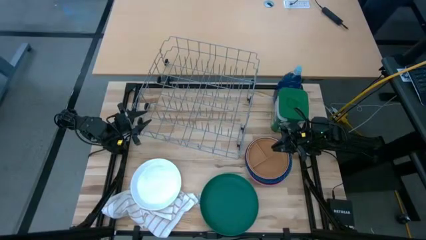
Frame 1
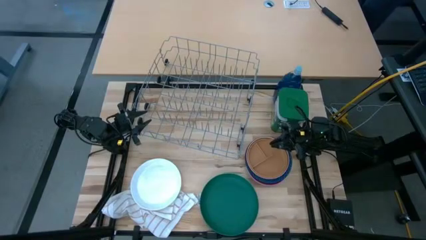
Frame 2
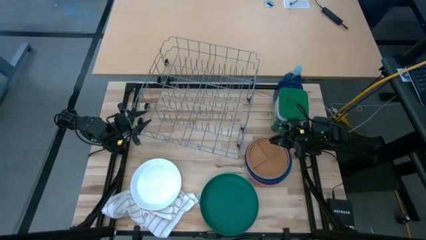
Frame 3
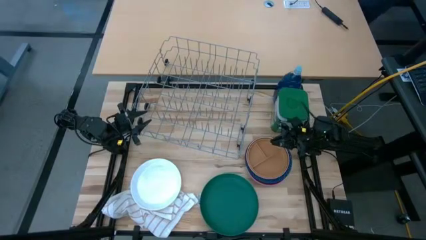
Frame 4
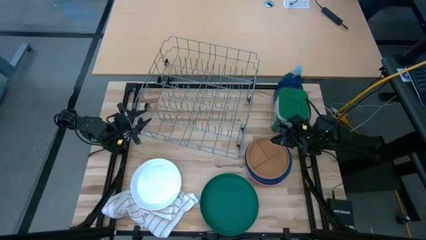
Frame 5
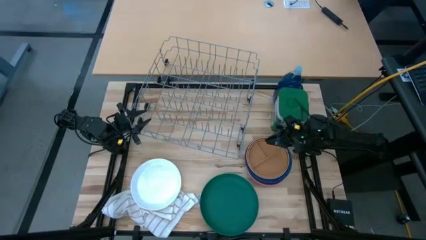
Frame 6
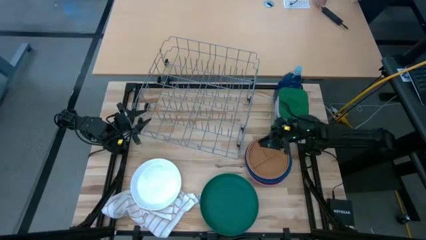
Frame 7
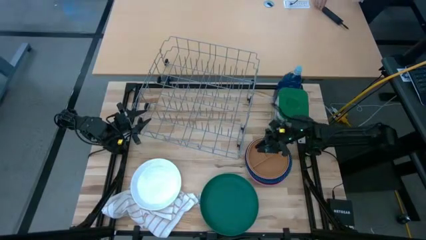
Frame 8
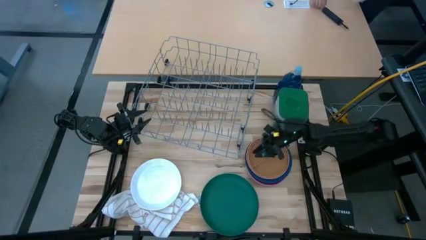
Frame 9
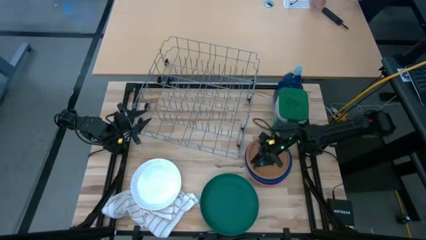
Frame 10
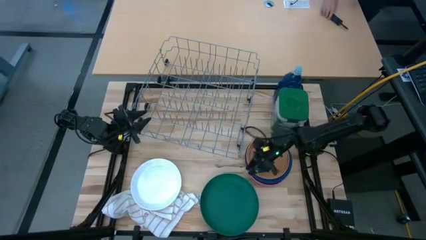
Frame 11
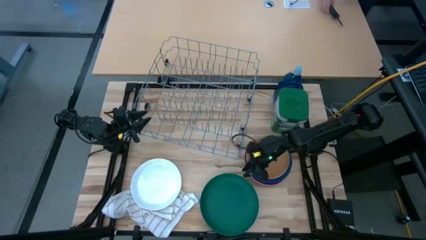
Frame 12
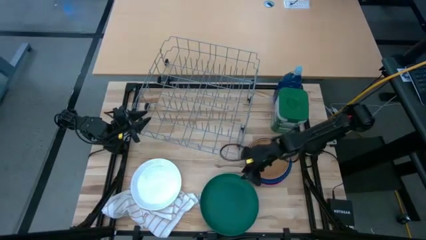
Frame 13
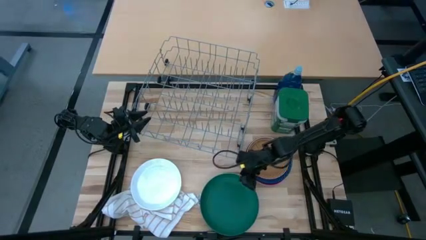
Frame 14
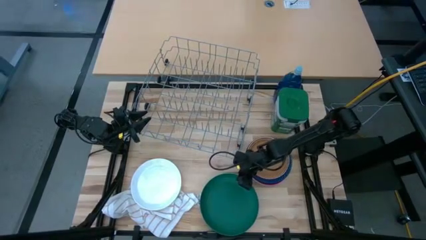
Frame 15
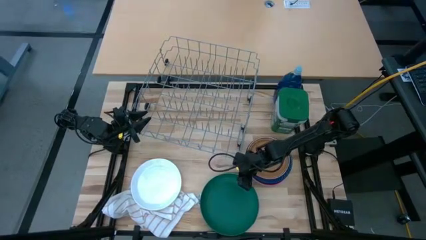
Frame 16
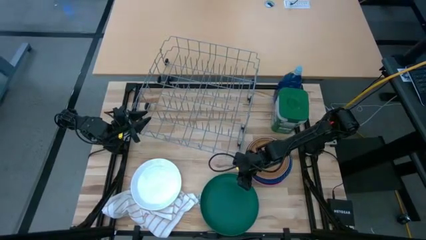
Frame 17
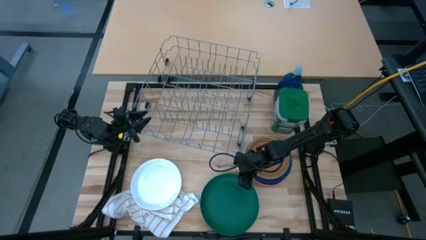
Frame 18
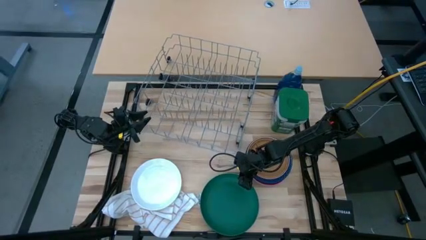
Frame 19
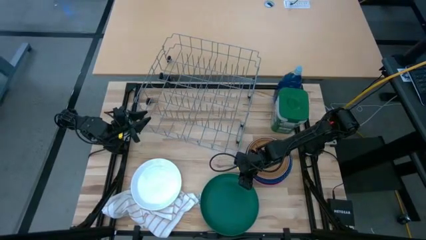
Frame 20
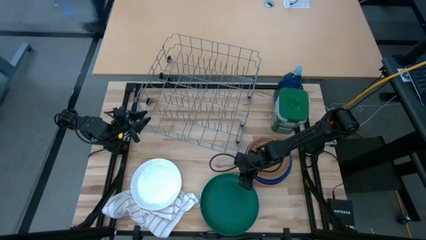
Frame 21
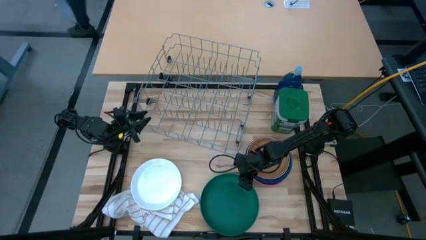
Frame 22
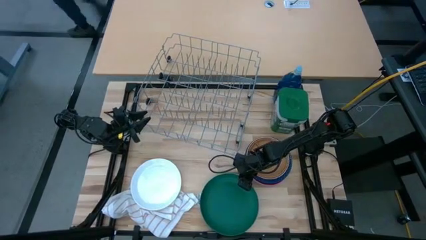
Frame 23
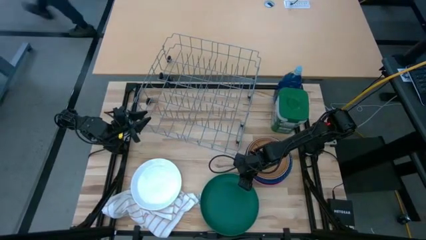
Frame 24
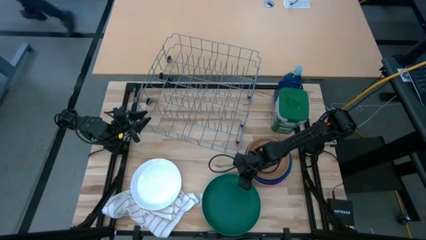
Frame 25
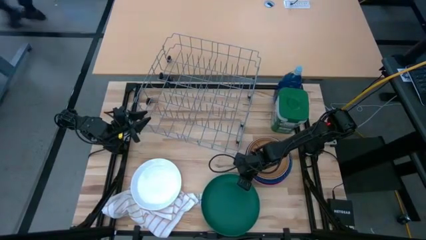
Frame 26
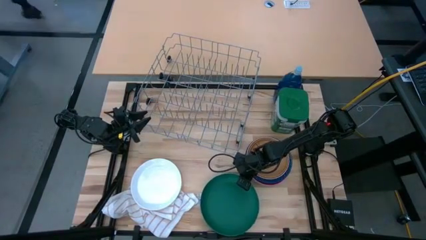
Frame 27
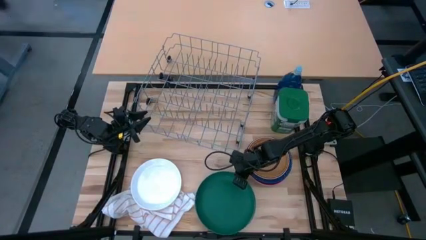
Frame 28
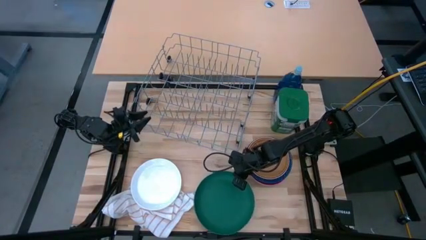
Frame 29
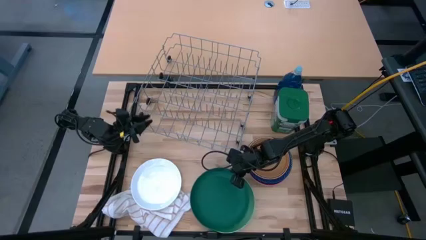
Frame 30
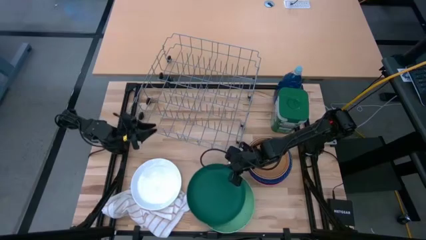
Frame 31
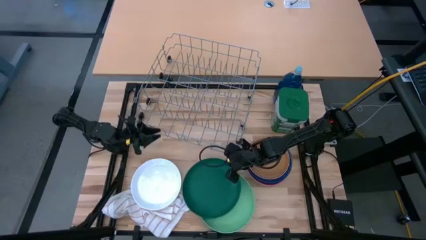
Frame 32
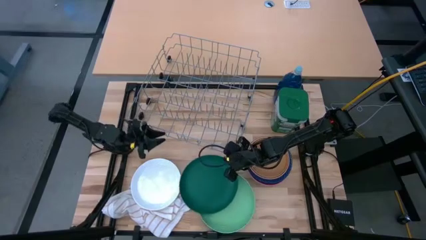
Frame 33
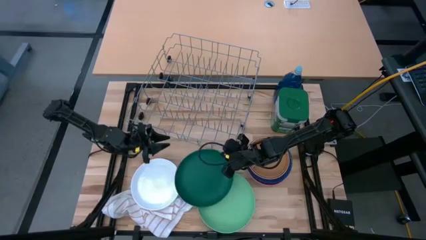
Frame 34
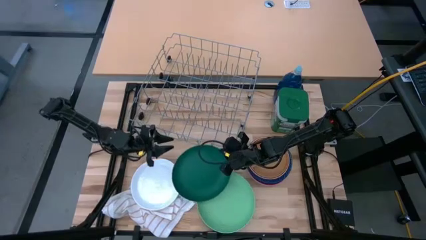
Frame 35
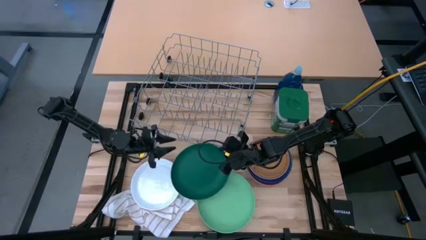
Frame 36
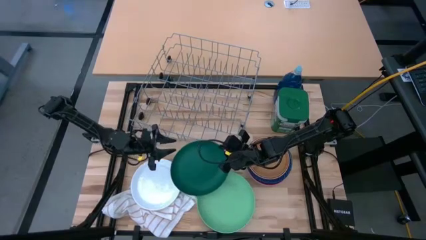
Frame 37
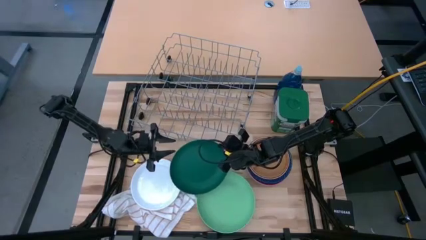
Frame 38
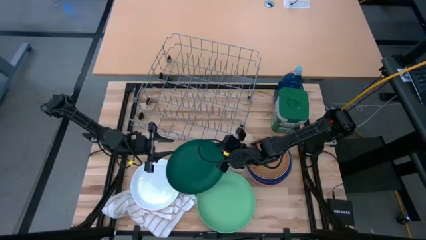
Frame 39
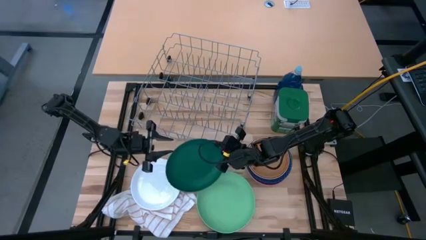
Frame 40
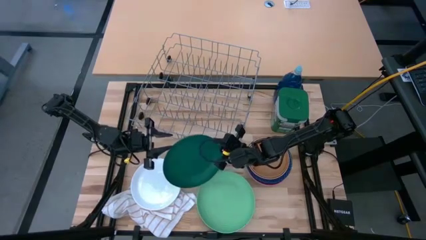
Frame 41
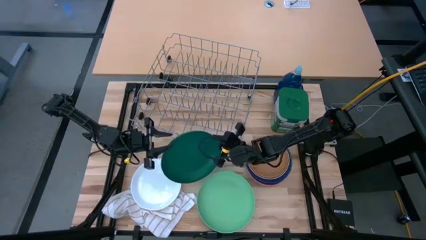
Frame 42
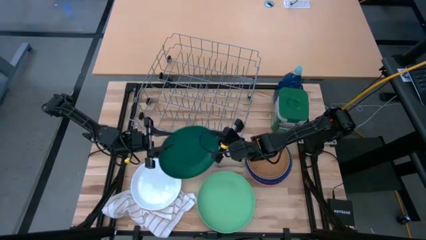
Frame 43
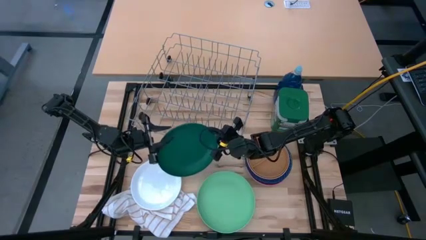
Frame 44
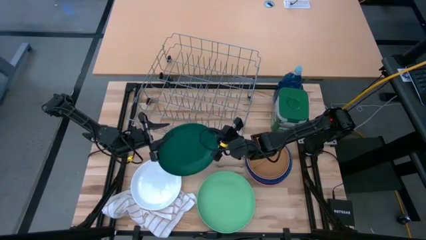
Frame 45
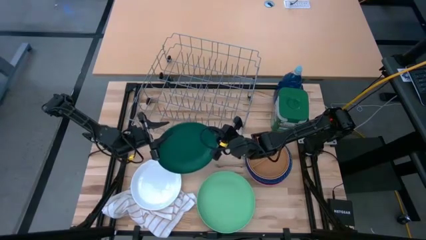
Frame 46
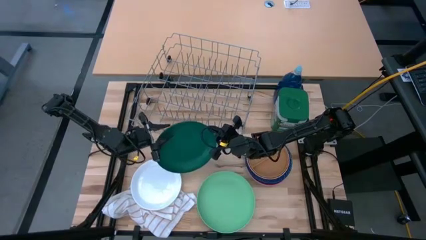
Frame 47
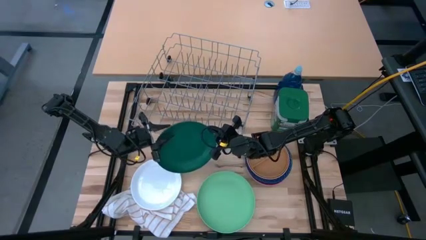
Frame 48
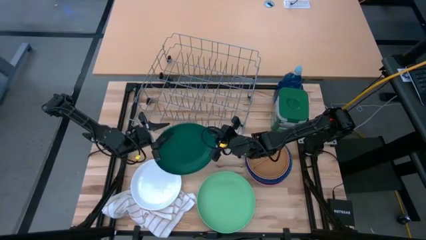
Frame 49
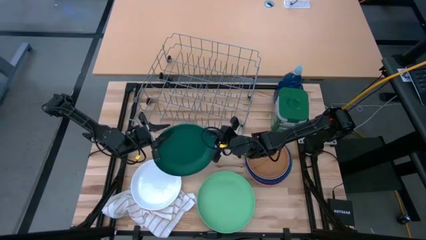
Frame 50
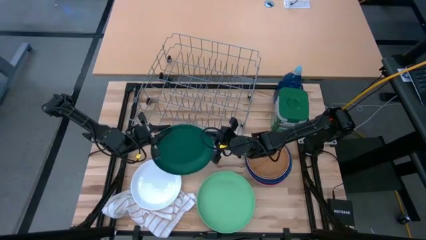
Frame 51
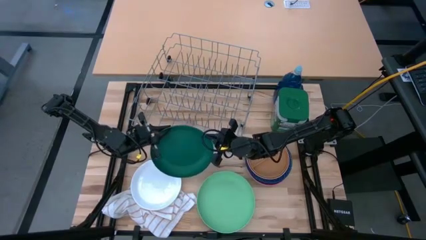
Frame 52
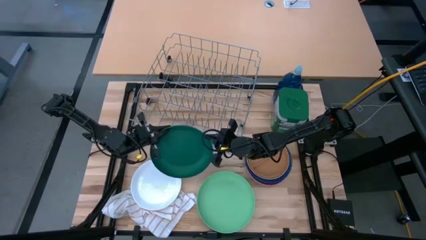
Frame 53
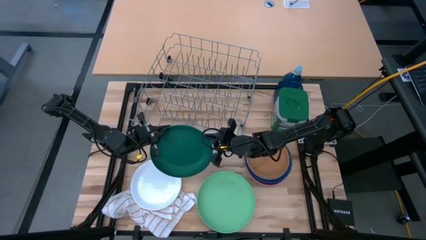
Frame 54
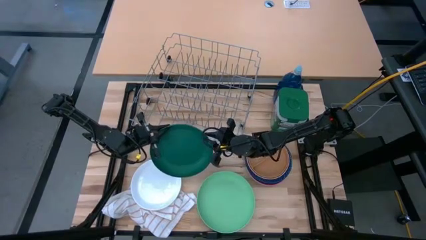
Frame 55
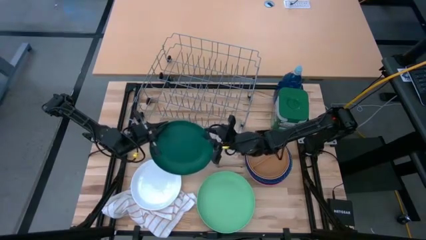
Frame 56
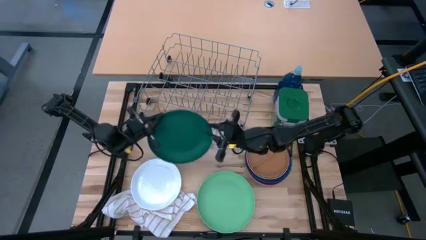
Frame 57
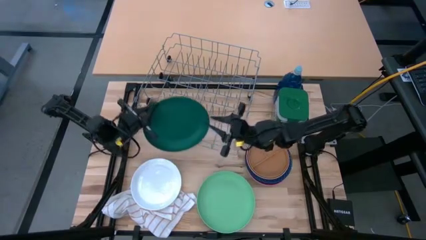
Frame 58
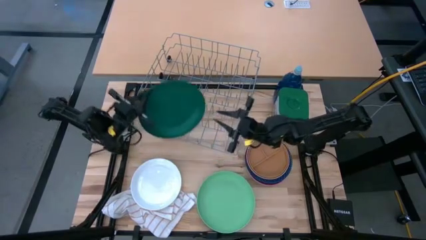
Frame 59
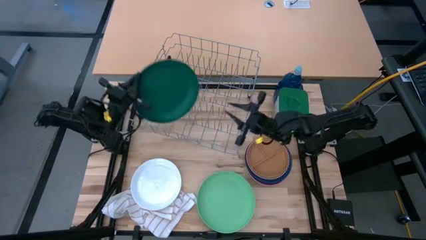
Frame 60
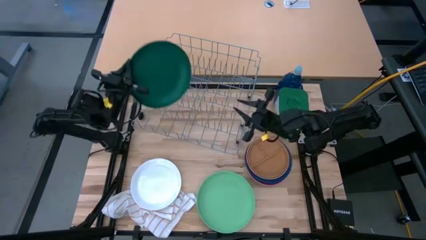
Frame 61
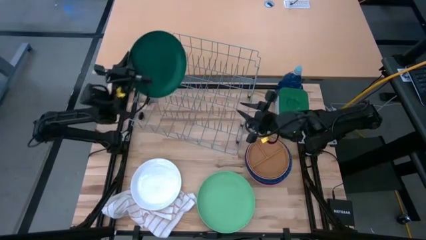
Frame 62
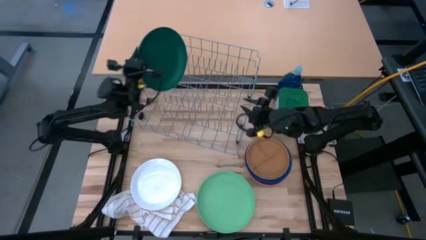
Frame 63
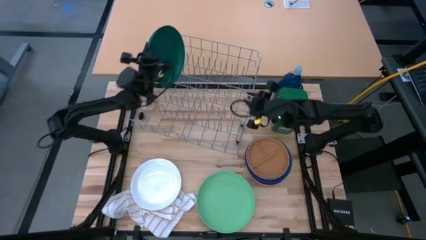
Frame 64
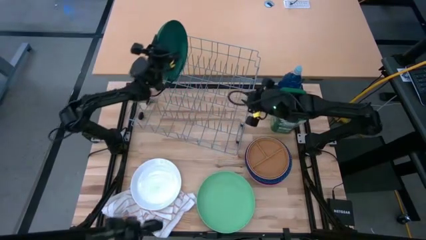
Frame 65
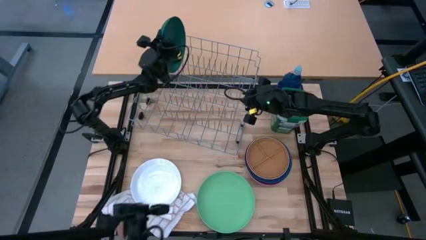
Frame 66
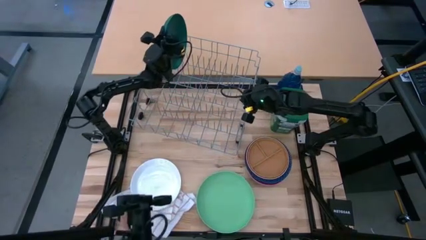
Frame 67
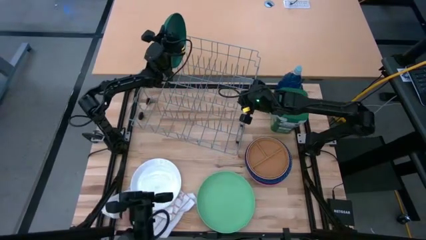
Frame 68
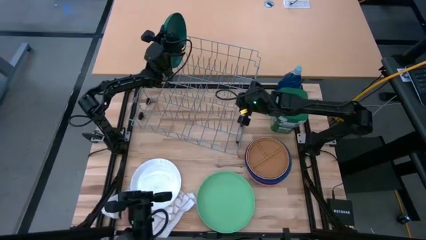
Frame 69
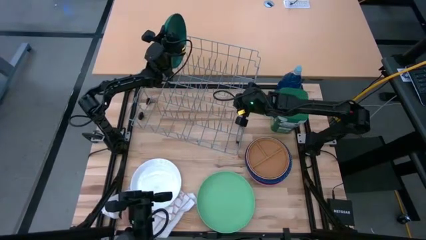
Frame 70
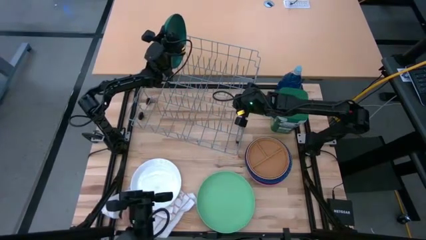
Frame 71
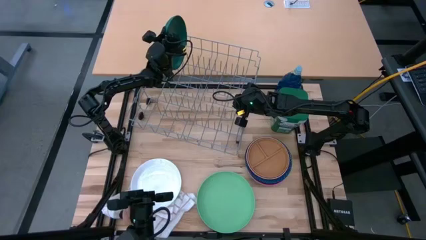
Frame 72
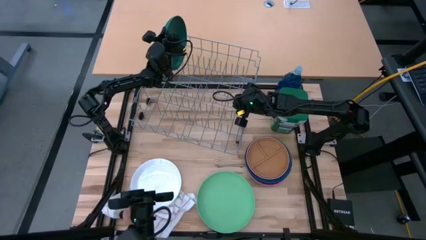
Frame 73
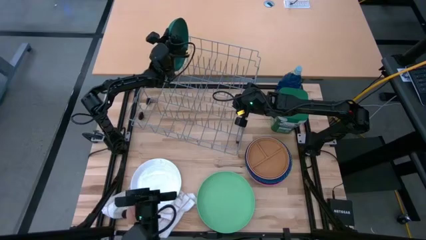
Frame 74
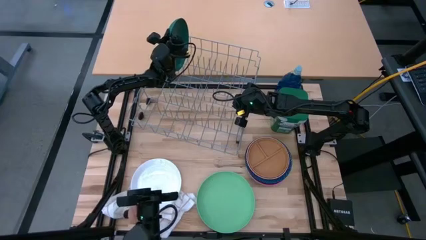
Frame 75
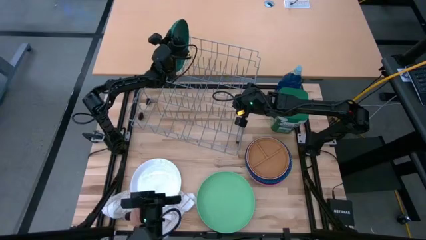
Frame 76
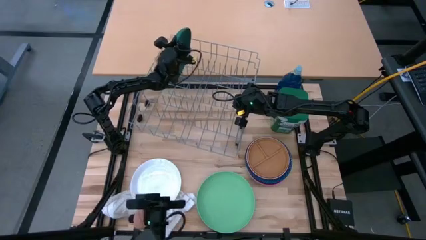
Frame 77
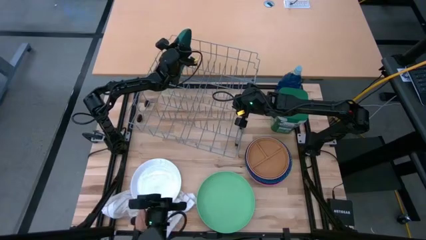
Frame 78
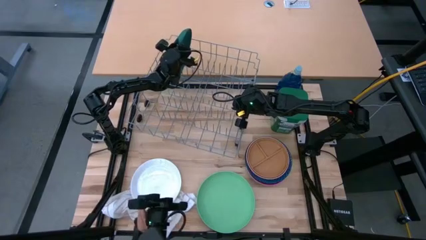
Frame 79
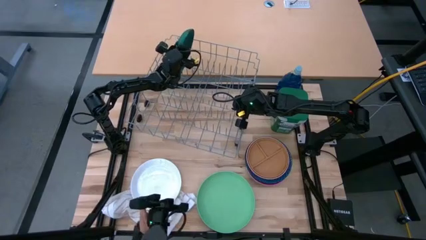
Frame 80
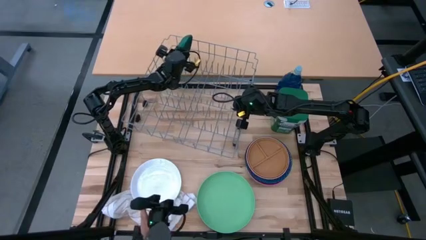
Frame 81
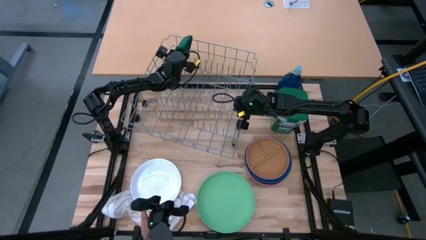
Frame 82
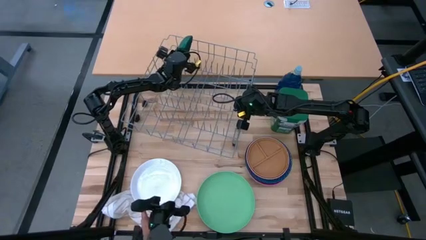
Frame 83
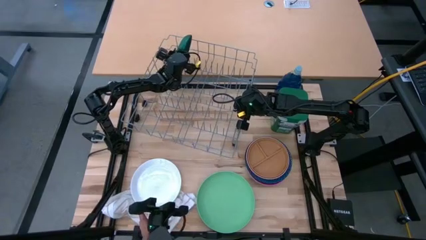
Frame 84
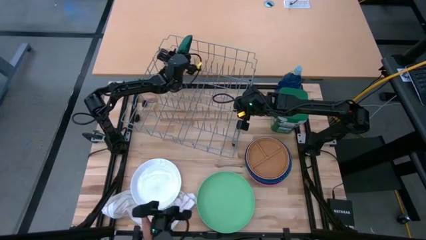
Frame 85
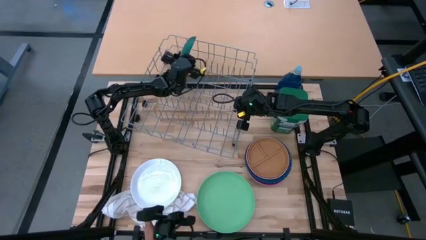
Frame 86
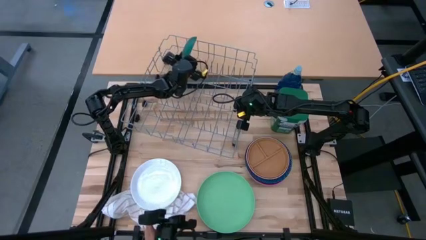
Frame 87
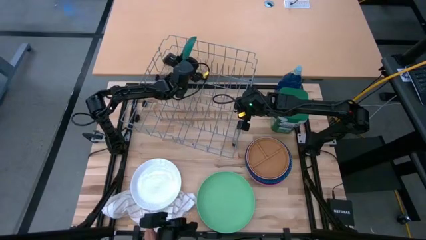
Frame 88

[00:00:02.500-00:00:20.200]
Task: Sort dishes
Put the dark green plate in the dish rack
